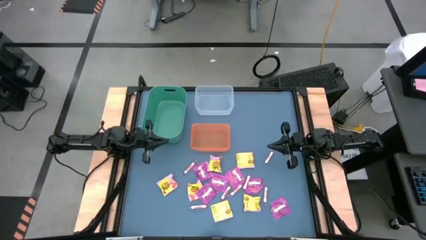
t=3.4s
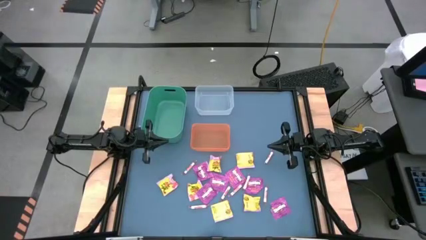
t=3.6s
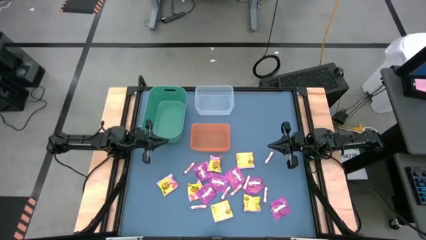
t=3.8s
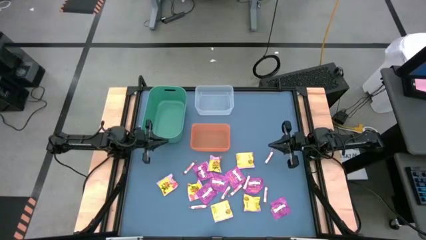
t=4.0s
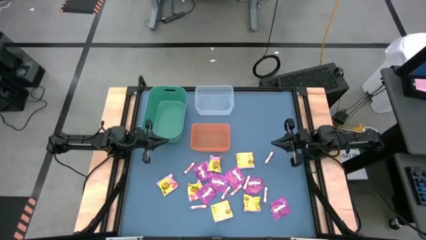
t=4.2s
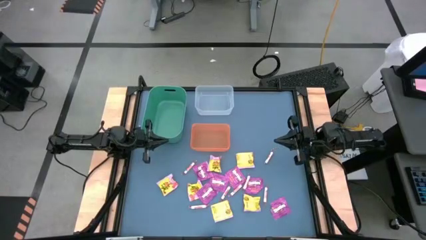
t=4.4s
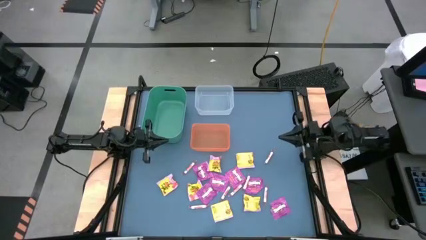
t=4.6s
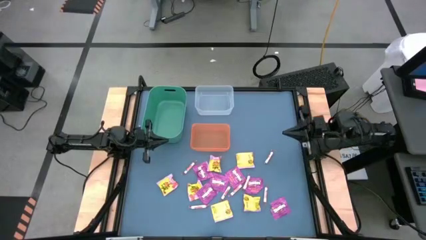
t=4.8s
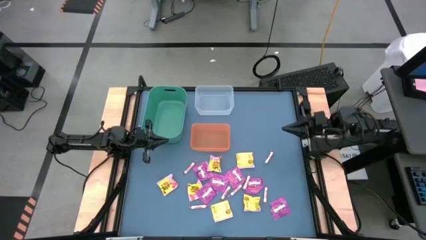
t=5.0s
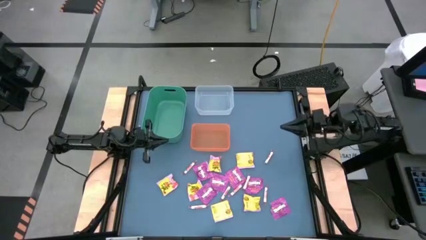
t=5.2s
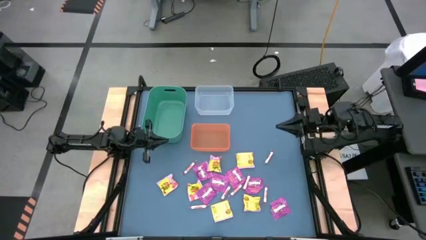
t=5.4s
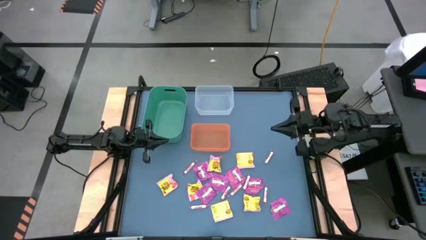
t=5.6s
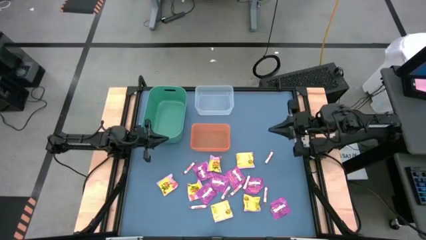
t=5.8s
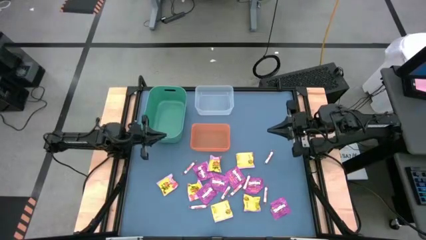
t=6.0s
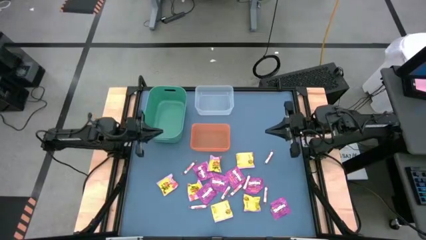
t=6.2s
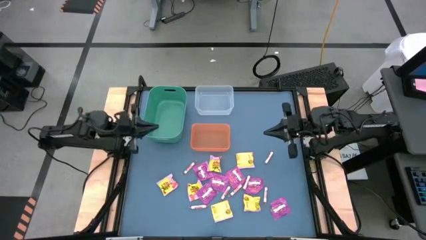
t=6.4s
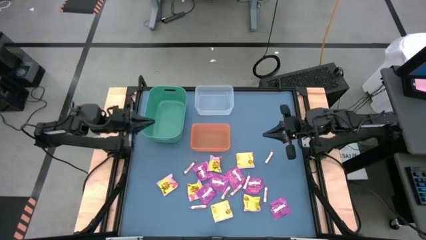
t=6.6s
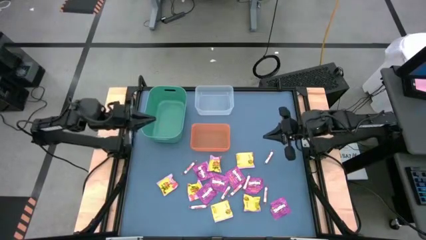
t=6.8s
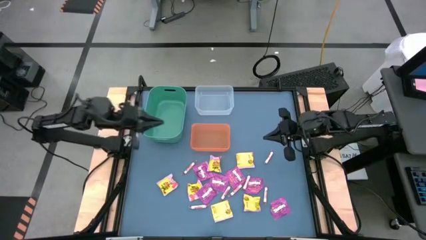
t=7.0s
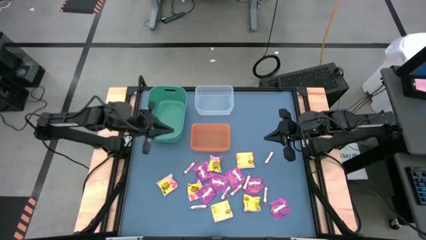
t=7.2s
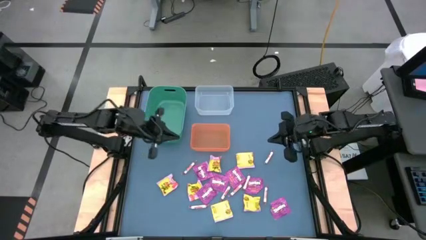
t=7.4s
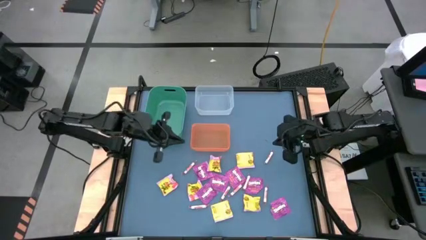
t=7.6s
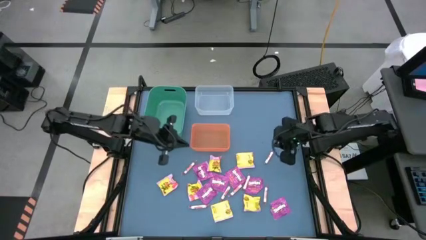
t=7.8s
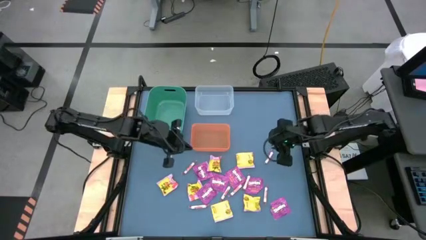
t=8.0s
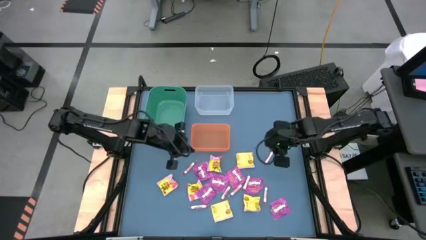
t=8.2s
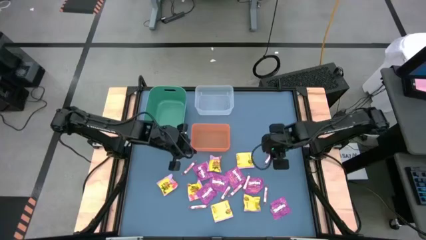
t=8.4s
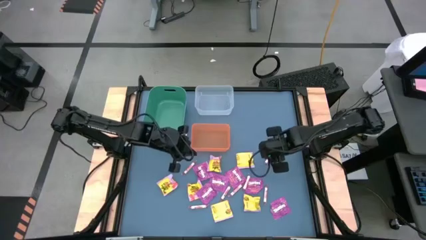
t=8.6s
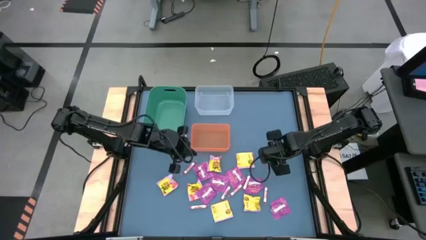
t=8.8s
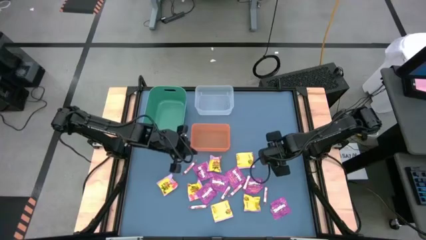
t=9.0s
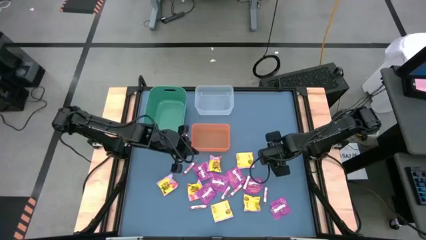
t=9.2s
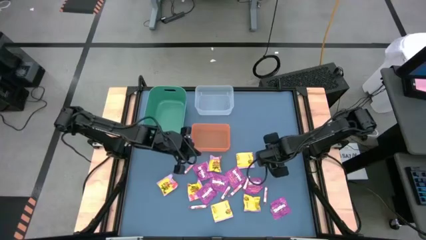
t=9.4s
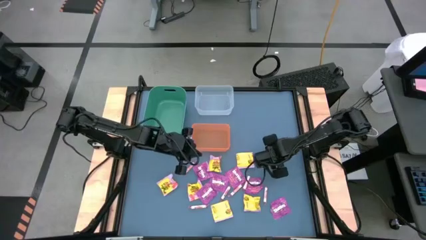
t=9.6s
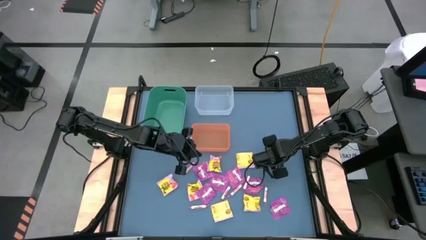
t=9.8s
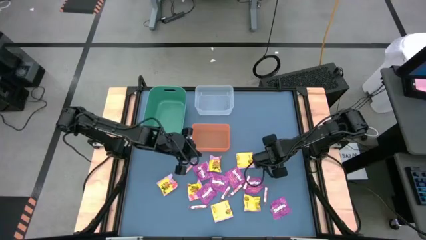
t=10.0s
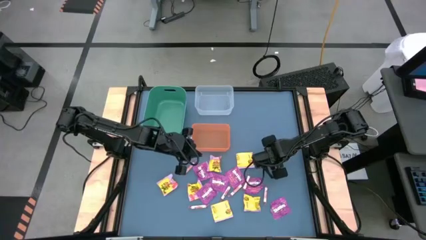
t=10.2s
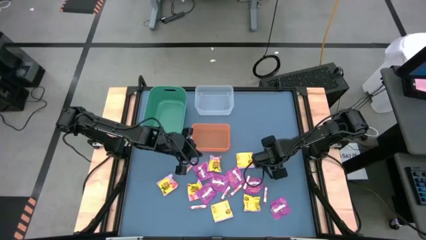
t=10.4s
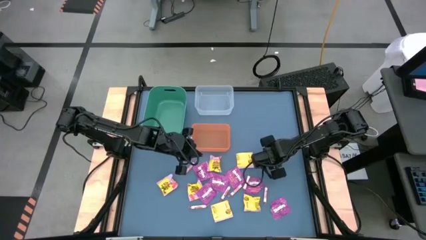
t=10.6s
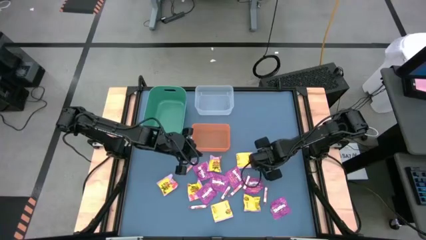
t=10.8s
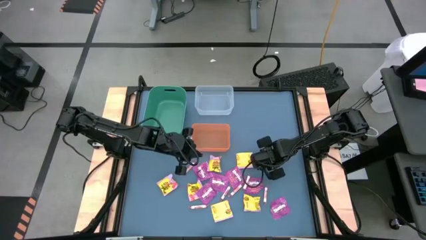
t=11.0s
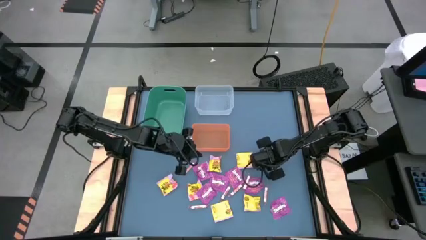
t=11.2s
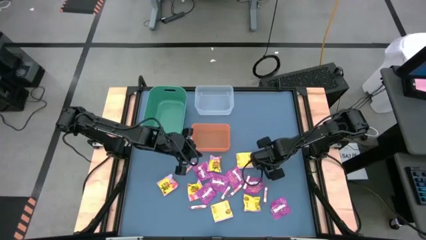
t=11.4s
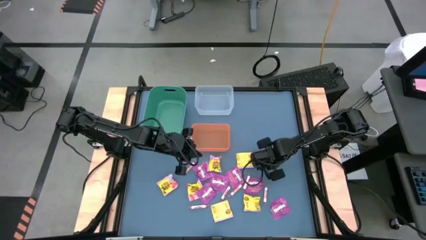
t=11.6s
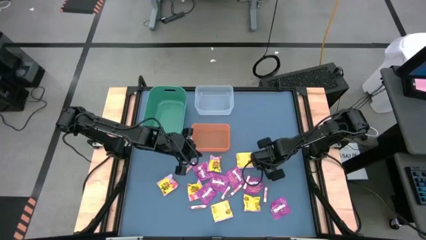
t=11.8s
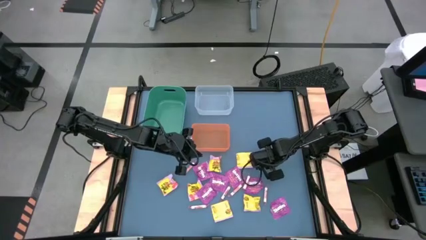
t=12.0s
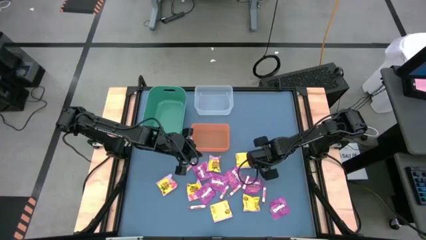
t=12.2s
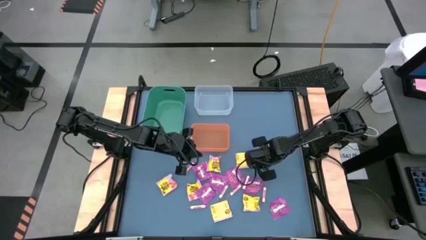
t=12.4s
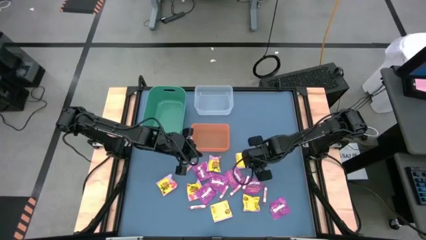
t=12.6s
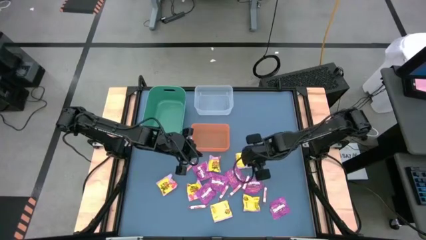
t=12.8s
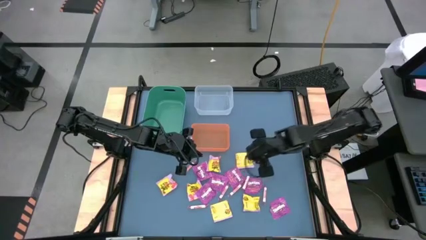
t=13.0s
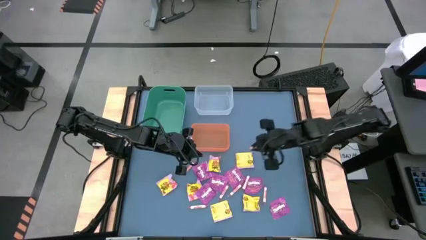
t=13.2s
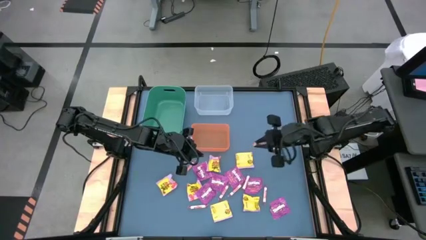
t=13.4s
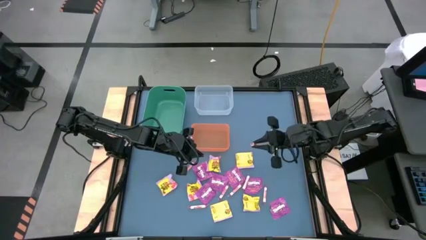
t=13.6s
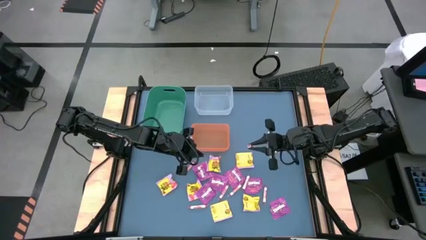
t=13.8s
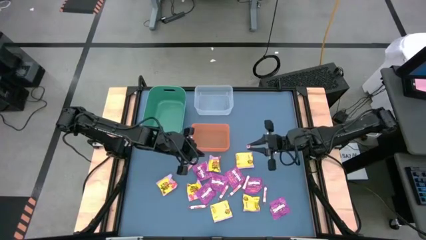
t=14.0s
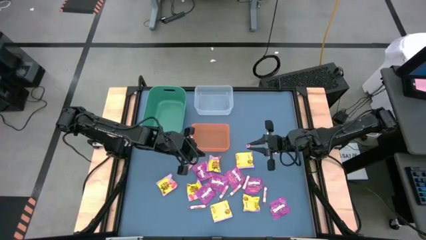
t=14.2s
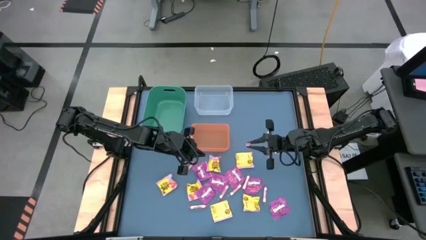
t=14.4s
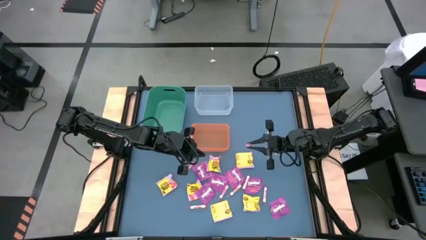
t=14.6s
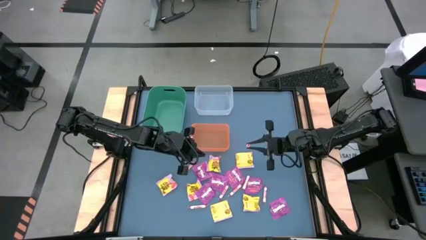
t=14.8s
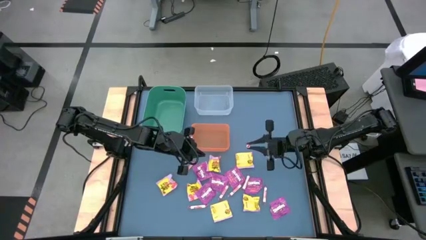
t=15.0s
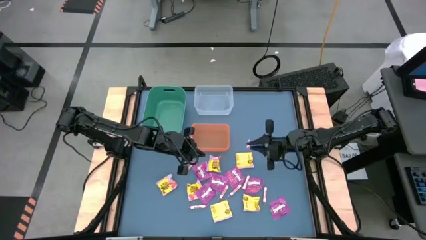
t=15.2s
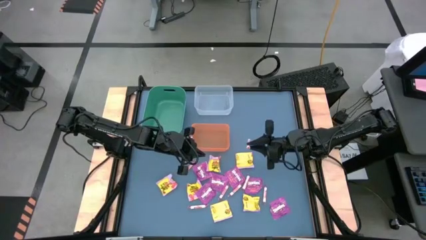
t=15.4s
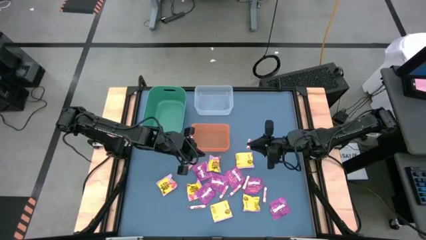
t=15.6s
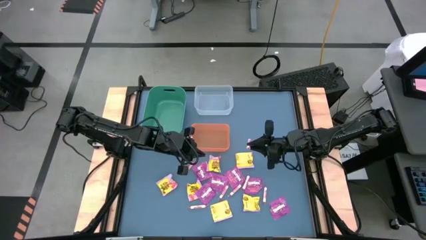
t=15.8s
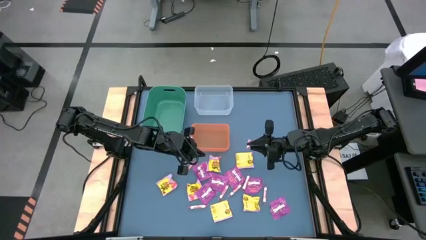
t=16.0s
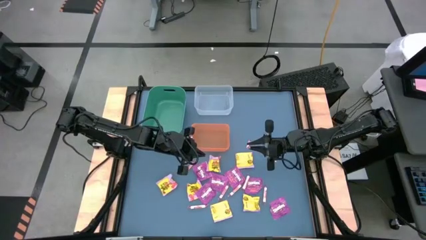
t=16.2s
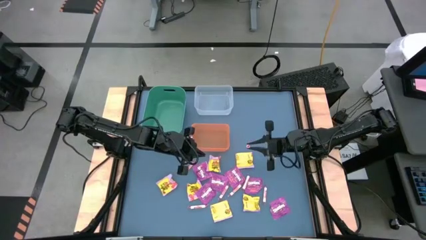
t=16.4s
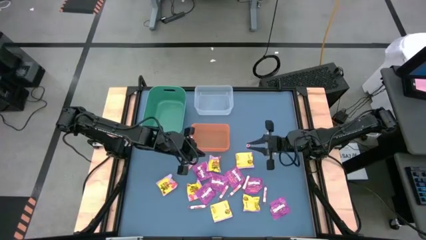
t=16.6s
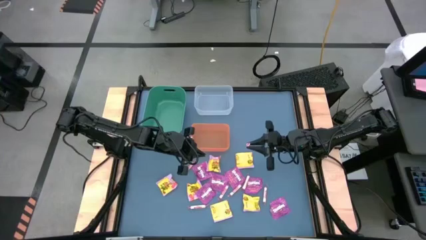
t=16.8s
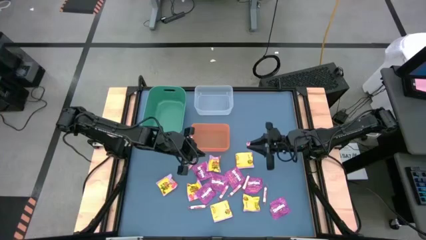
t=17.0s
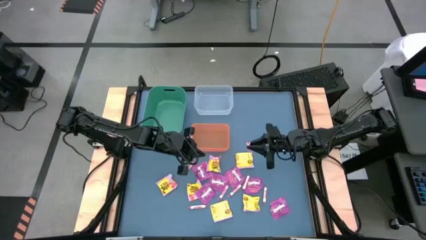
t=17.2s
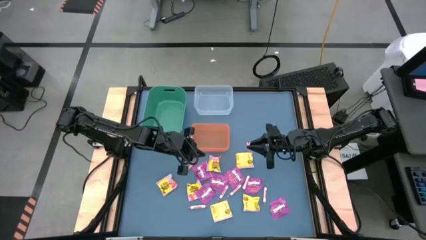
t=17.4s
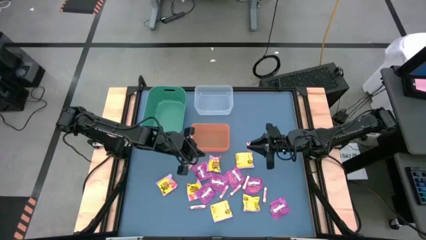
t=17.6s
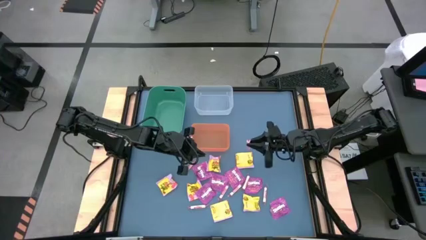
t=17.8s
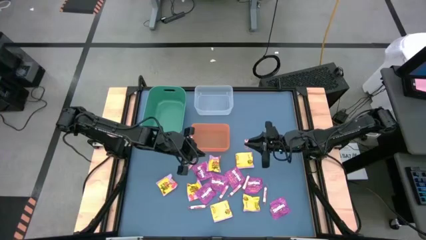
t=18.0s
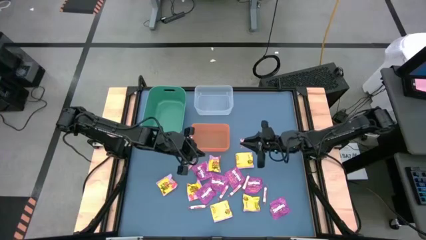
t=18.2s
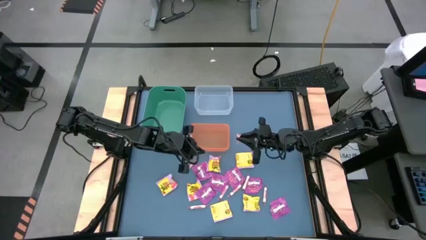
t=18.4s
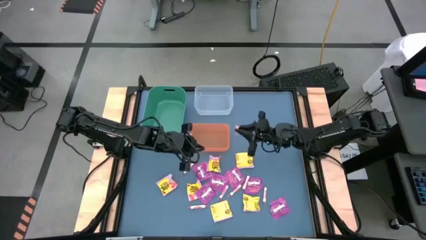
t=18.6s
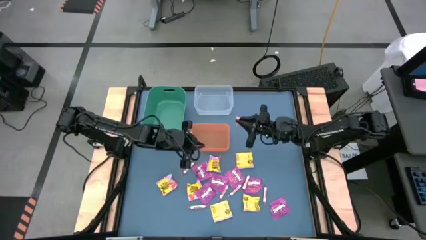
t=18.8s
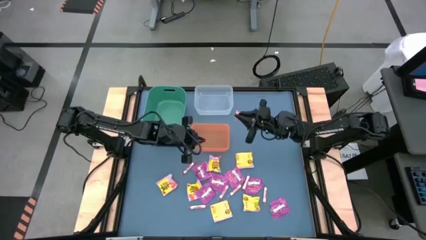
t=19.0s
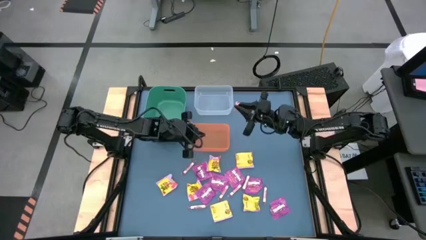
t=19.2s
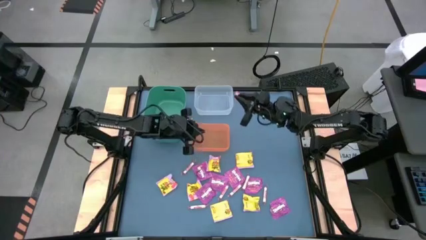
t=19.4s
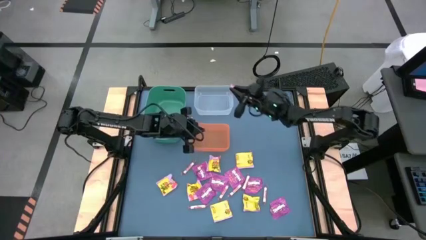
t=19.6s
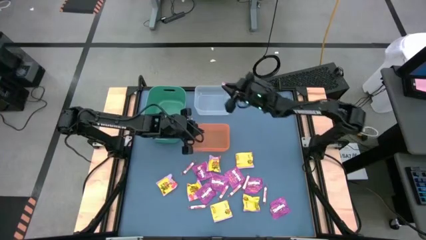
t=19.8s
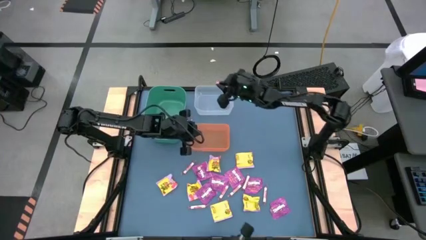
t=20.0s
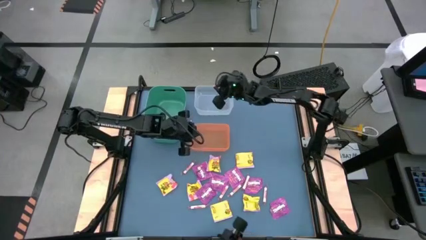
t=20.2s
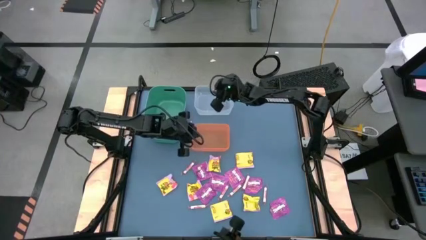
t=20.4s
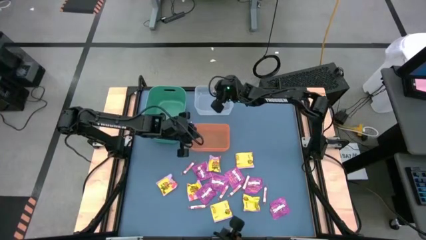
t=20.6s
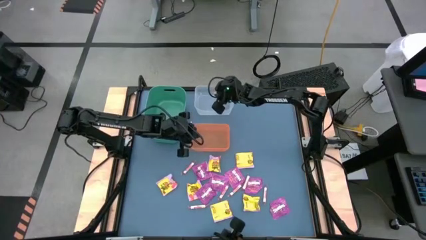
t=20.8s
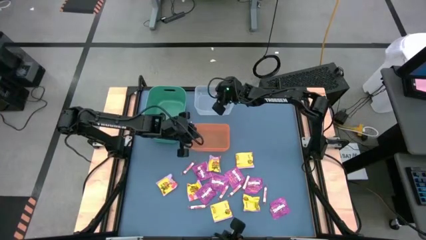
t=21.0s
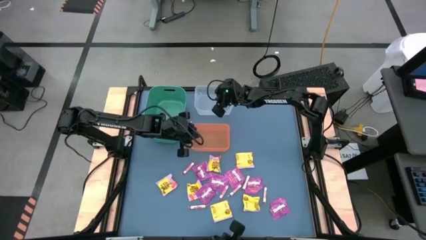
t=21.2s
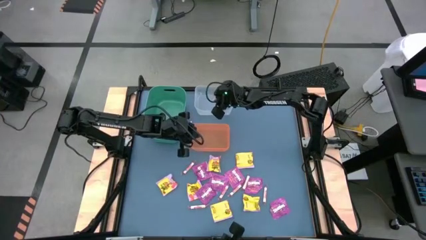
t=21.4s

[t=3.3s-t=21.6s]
Task: Sort candy
Put the white candy into the transparent bin
